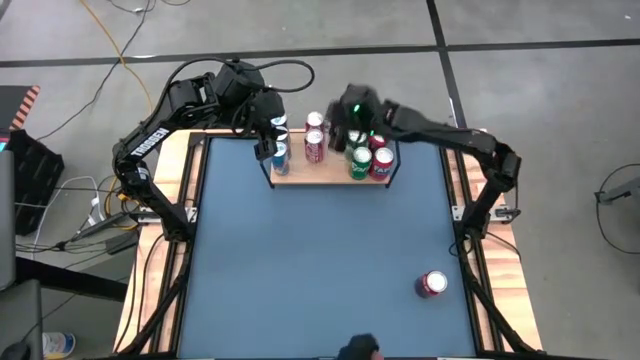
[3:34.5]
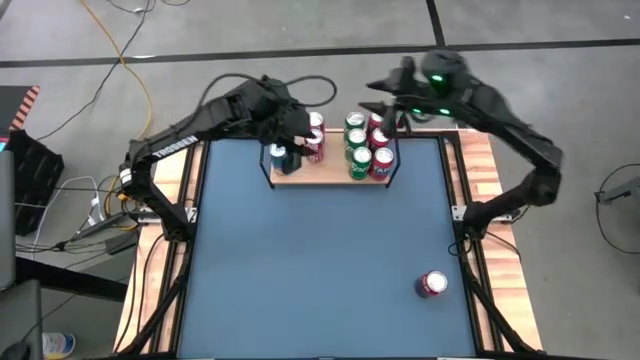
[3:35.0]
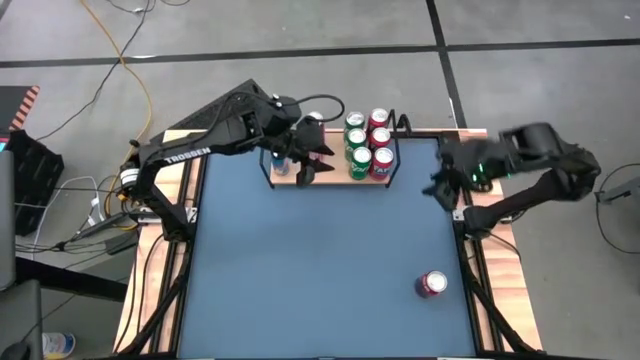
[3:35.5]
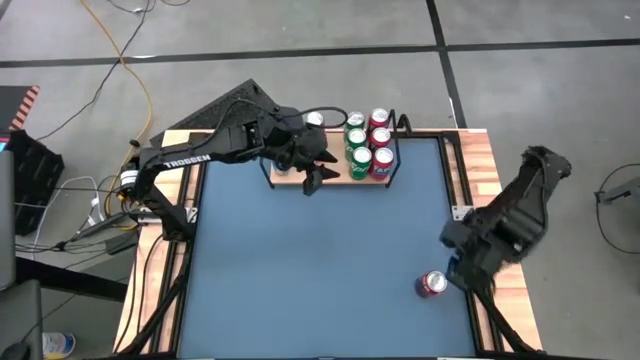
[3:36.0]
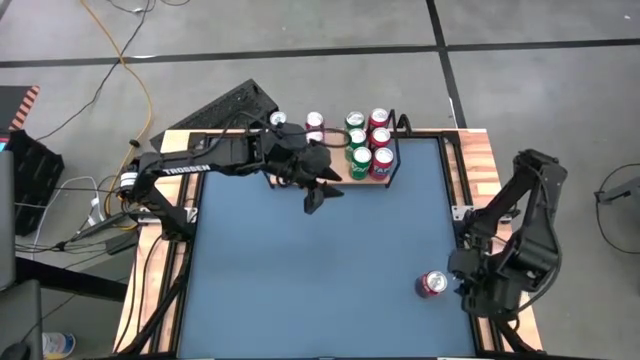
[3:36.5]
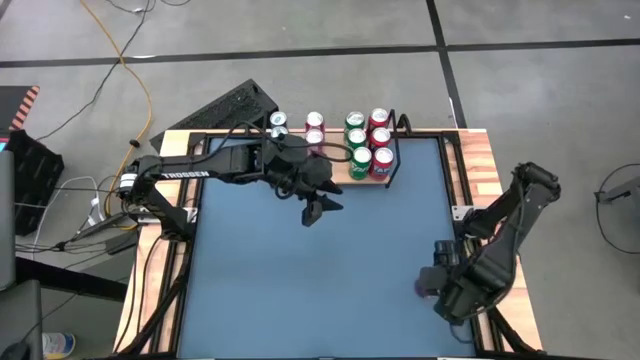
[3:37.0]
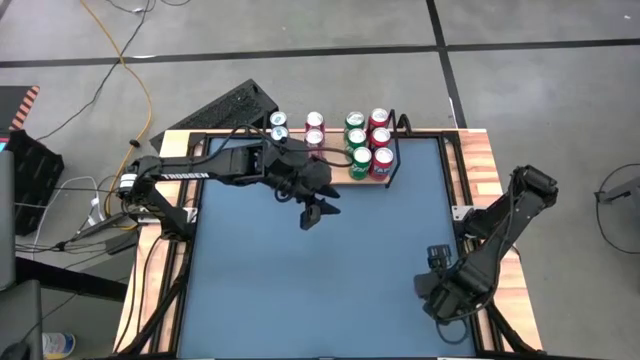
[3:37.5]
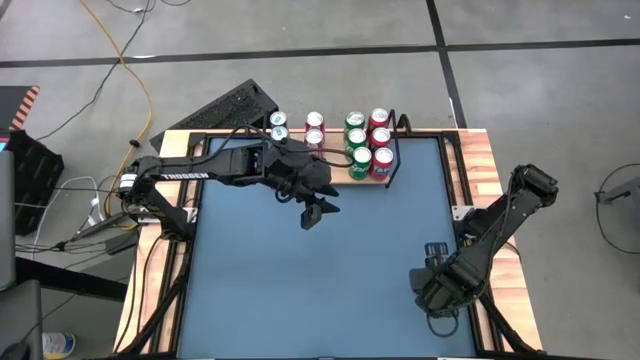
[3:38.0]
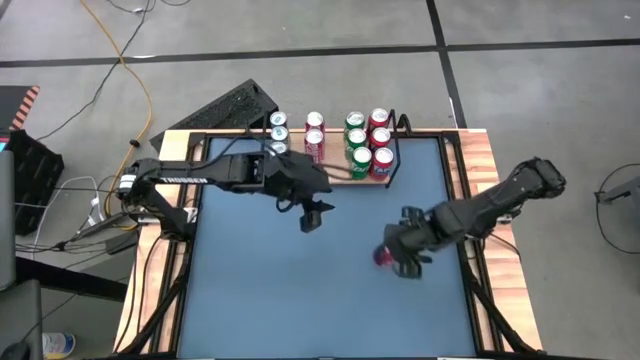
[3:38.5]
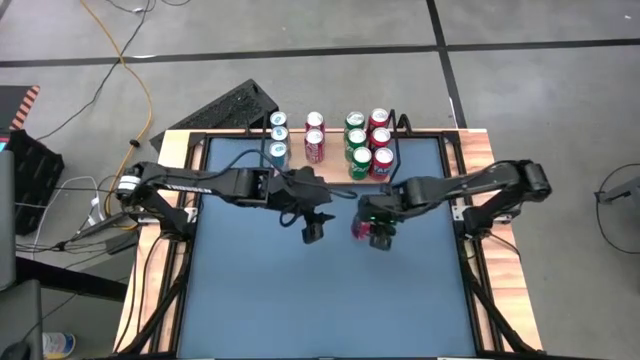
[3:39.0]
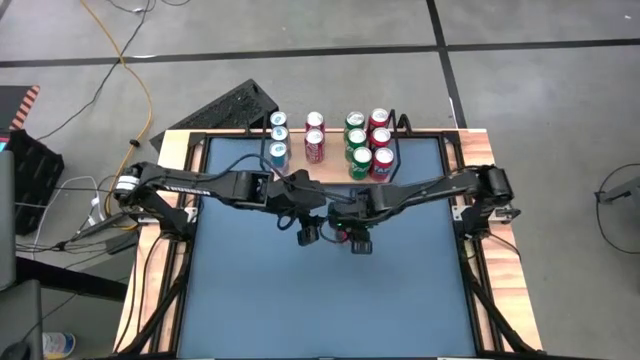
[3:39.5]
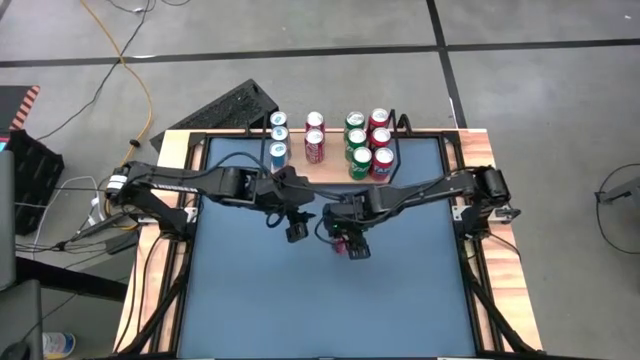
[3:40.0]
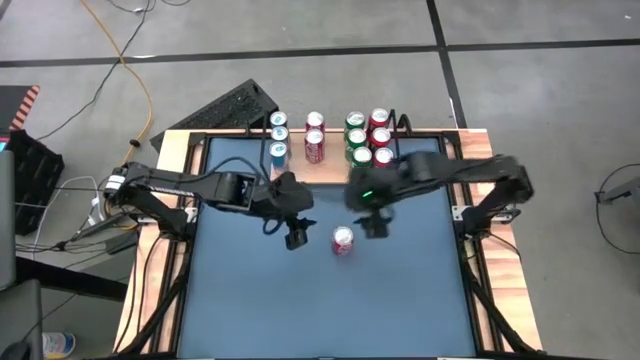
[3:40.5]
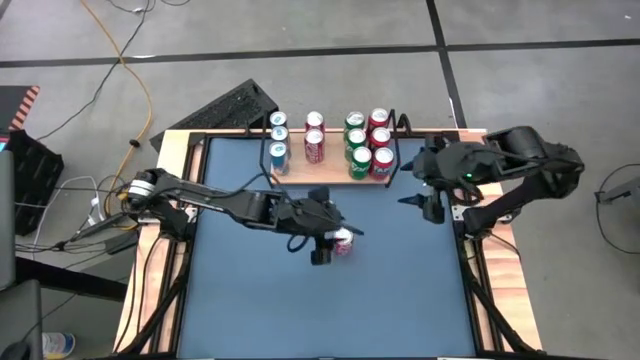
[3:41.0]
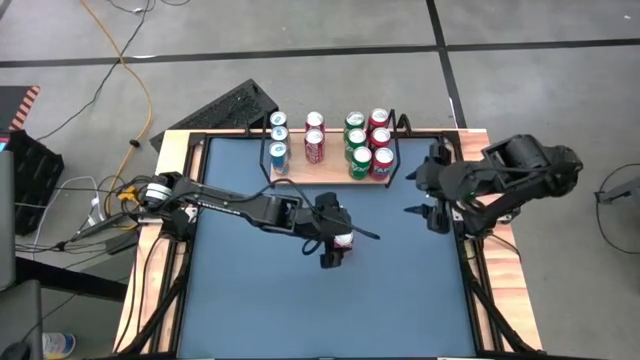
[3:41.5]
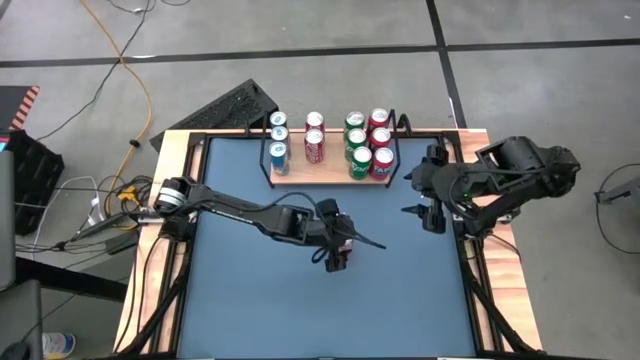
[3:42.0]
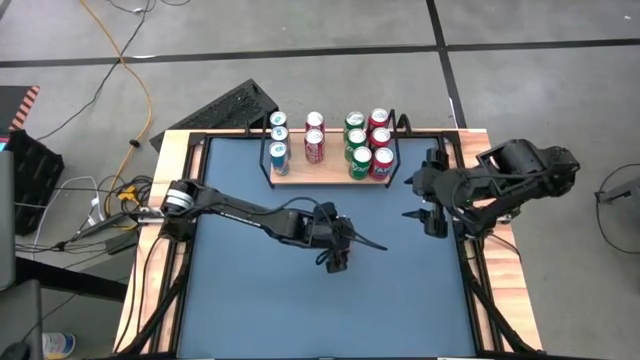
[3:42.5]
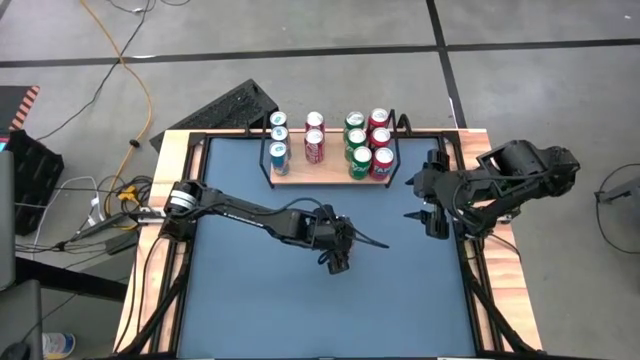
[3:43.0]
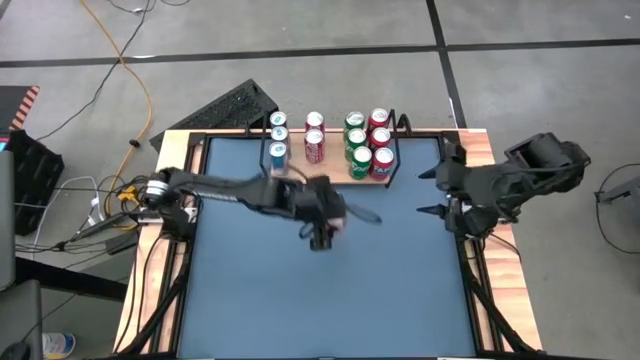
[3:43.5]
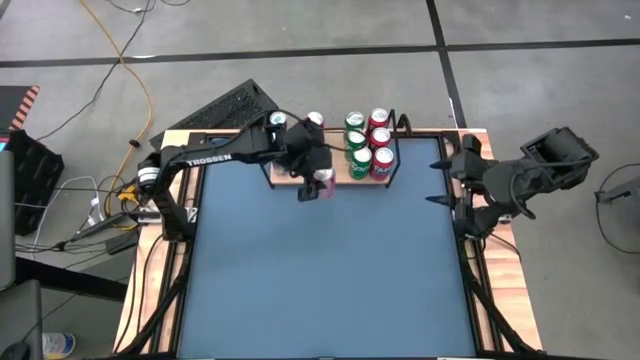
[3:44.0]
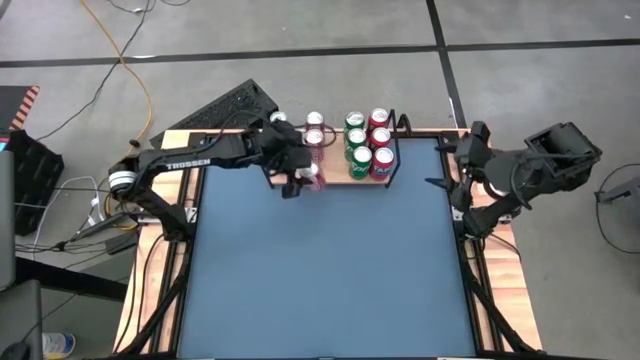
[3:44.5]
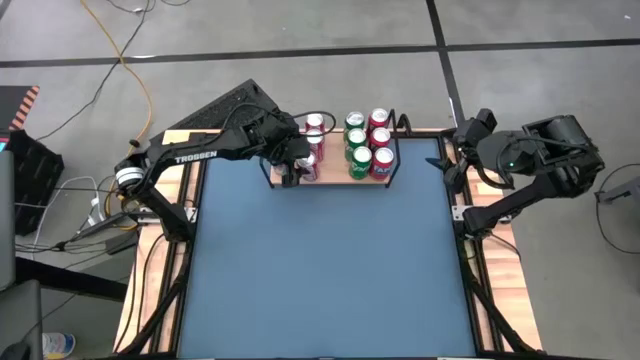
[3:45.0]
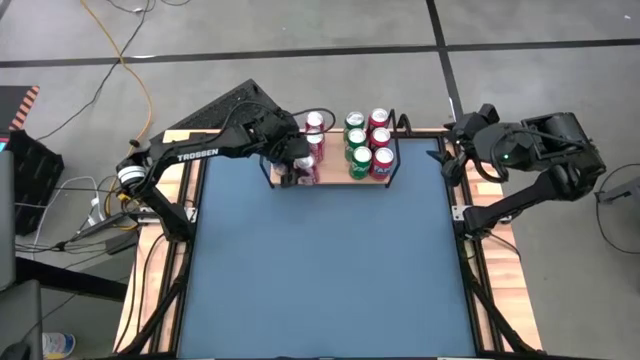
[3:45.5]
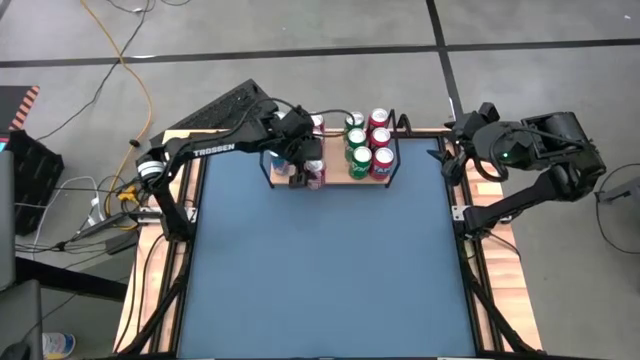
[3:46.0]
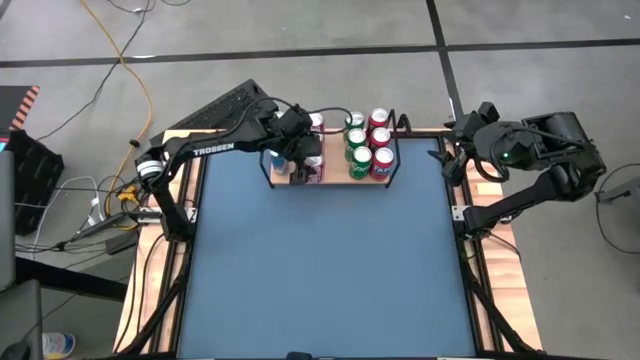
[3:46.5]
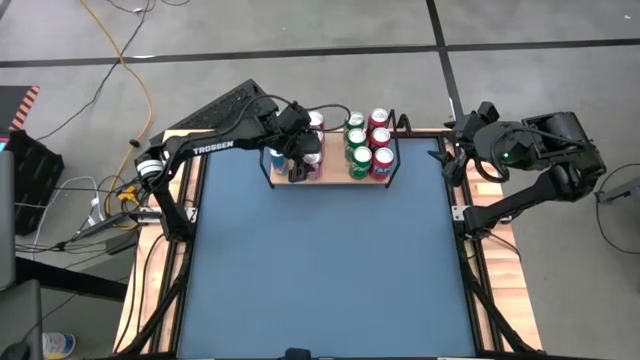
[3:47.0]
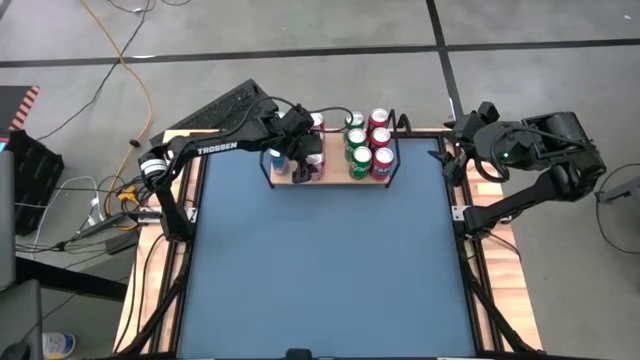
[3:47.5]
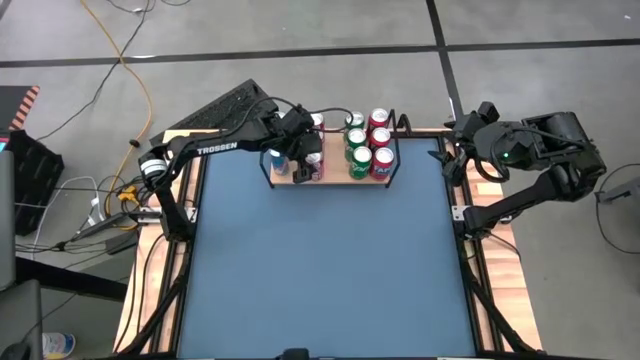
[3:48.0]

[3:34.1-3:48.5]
Task: Place canned beverage on shelf
Put the red white soda can on the shelf aligned with the other red white soda cans
